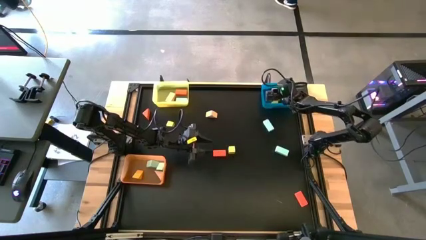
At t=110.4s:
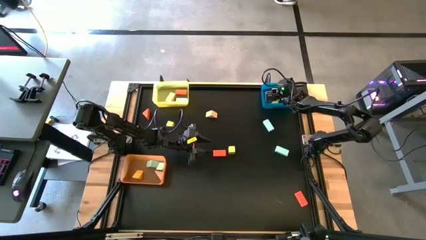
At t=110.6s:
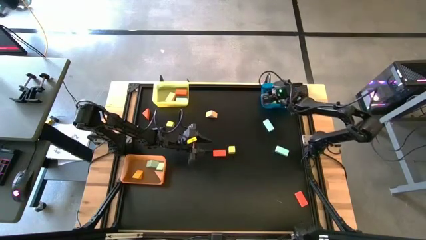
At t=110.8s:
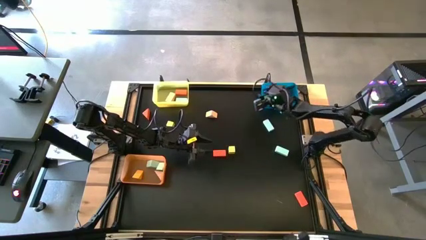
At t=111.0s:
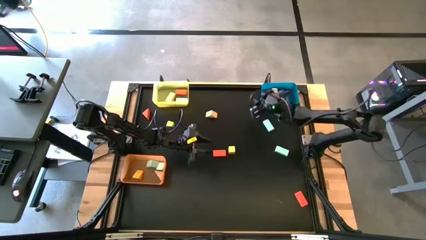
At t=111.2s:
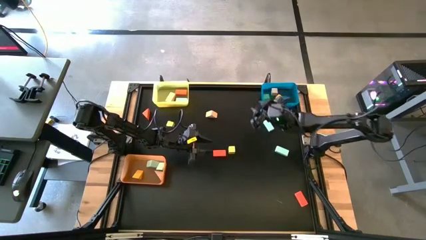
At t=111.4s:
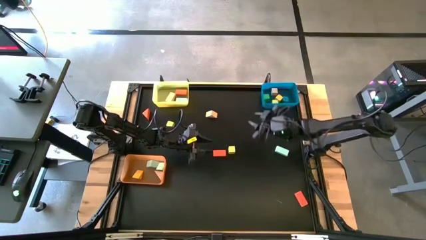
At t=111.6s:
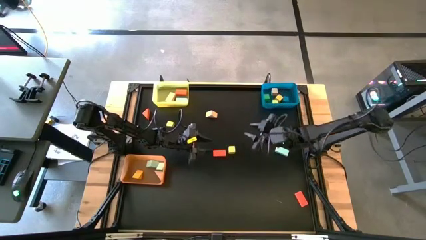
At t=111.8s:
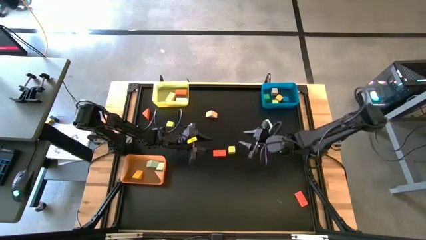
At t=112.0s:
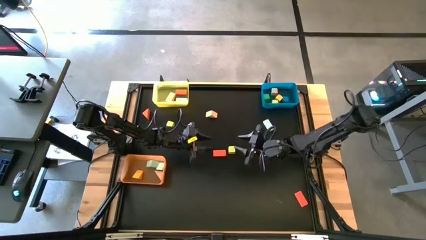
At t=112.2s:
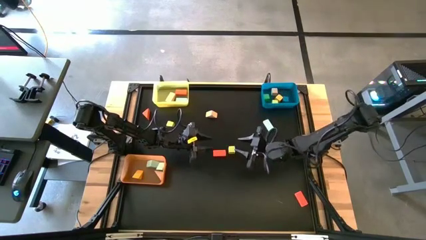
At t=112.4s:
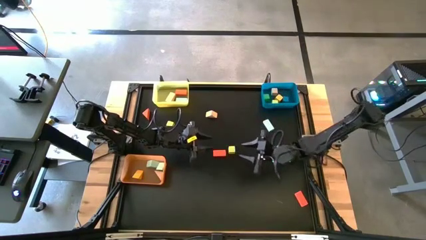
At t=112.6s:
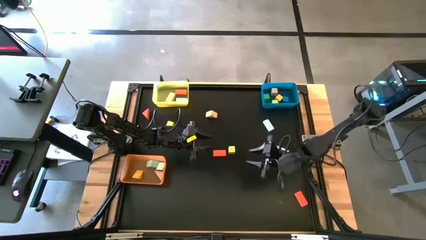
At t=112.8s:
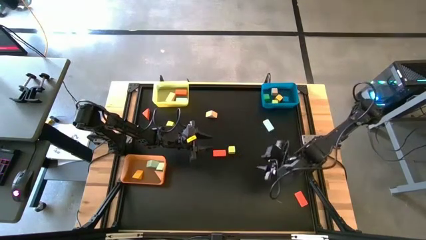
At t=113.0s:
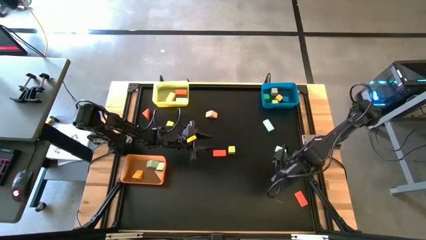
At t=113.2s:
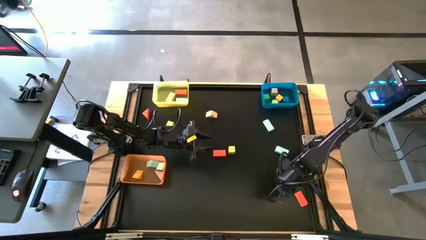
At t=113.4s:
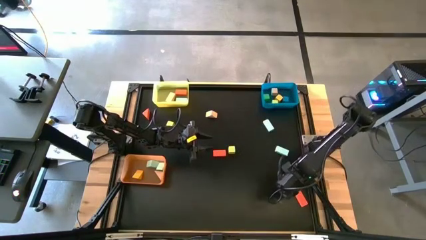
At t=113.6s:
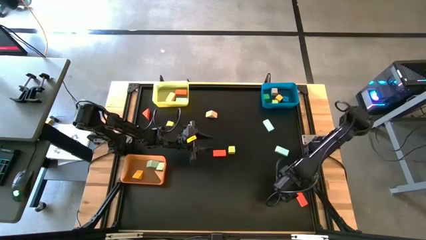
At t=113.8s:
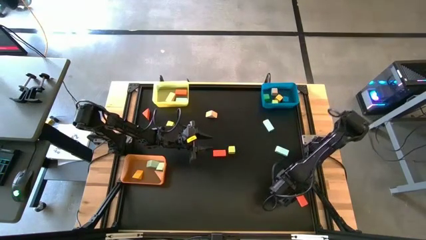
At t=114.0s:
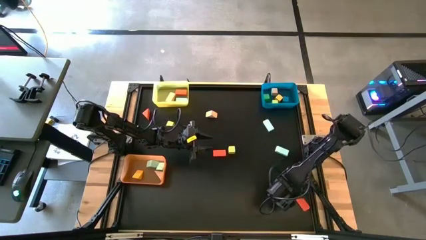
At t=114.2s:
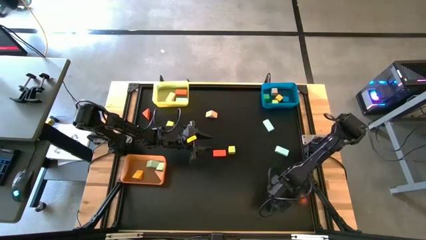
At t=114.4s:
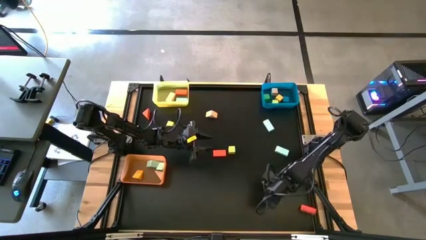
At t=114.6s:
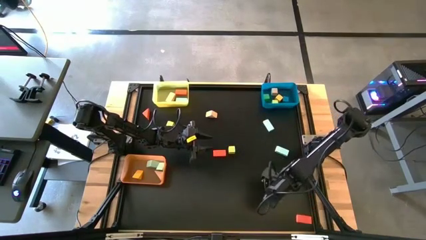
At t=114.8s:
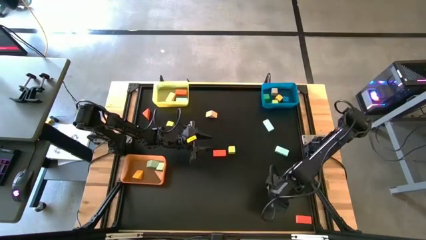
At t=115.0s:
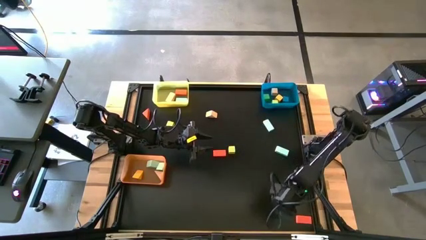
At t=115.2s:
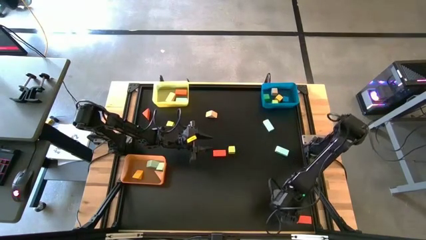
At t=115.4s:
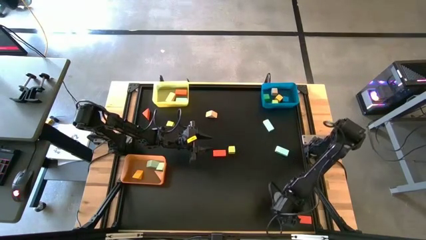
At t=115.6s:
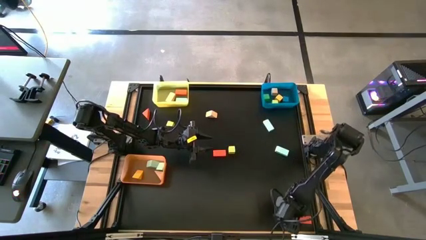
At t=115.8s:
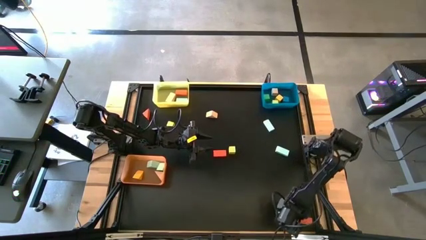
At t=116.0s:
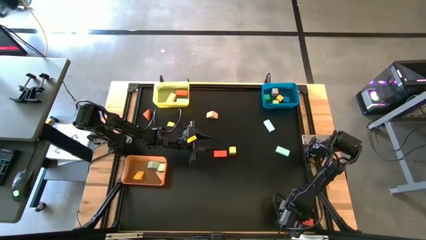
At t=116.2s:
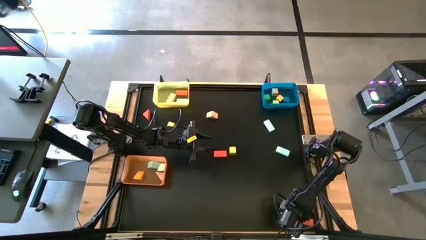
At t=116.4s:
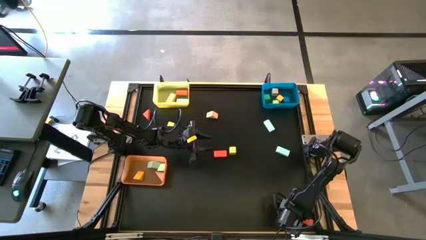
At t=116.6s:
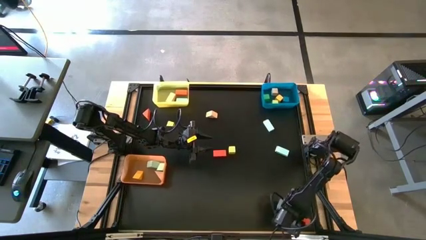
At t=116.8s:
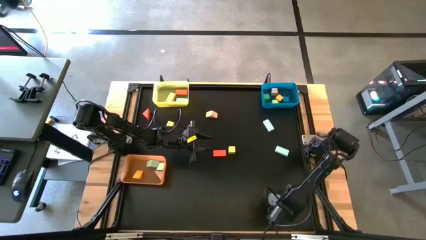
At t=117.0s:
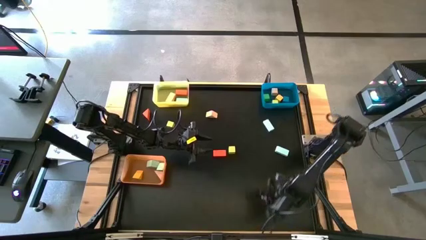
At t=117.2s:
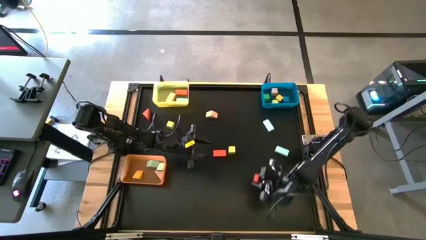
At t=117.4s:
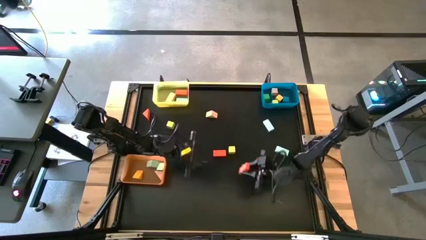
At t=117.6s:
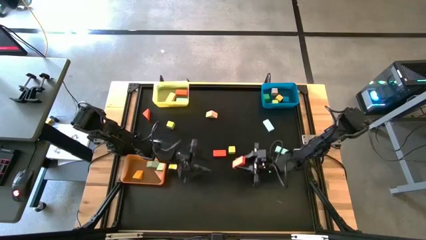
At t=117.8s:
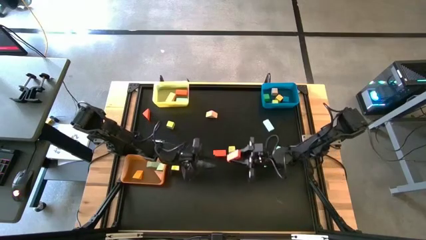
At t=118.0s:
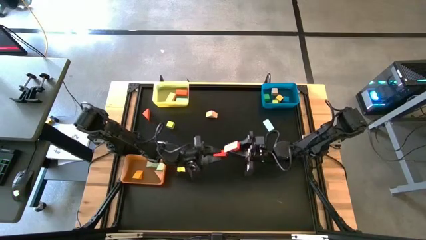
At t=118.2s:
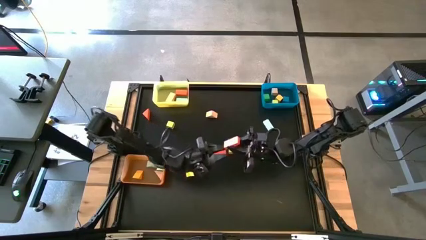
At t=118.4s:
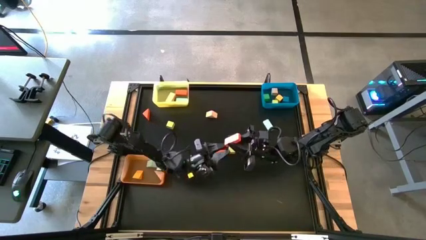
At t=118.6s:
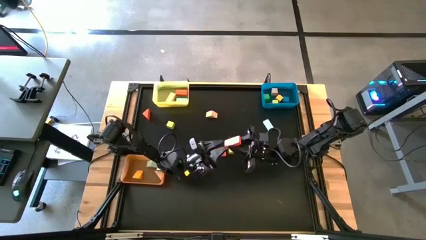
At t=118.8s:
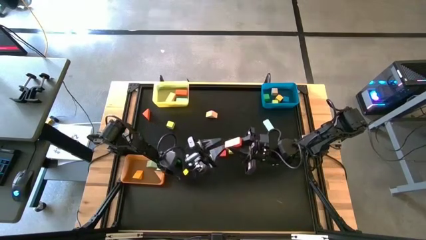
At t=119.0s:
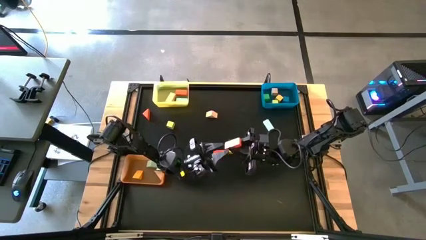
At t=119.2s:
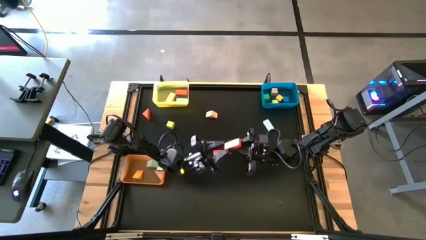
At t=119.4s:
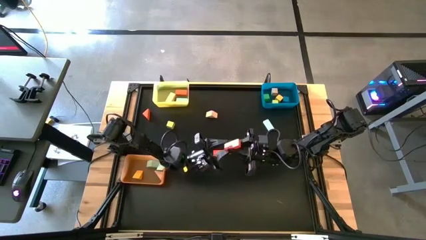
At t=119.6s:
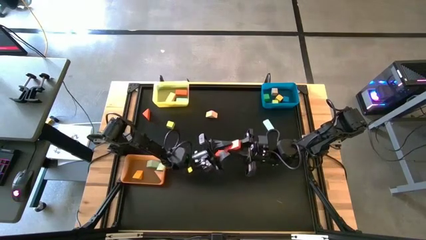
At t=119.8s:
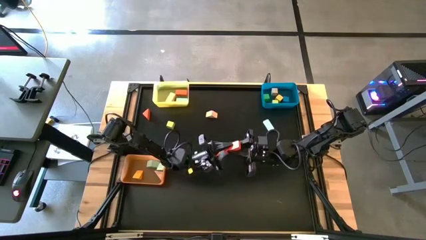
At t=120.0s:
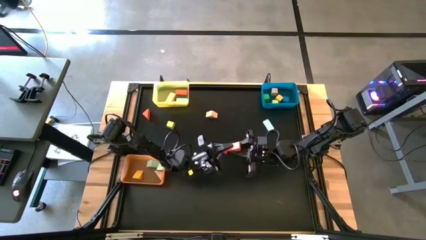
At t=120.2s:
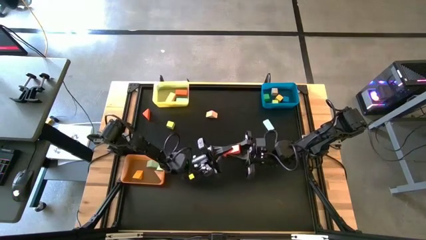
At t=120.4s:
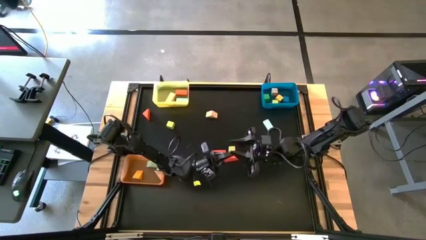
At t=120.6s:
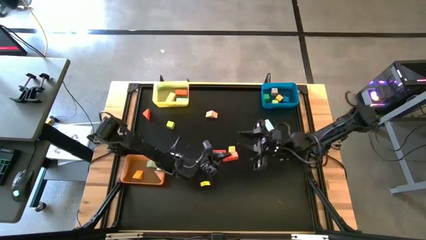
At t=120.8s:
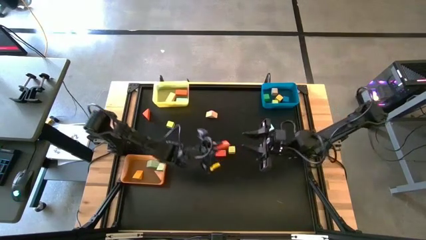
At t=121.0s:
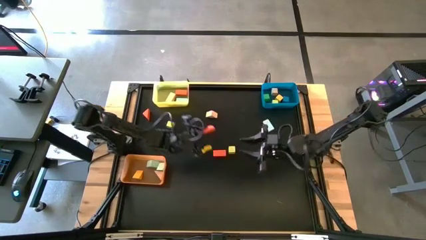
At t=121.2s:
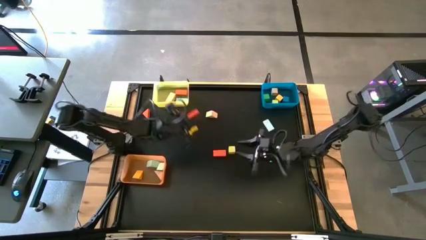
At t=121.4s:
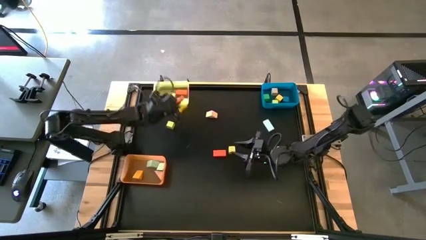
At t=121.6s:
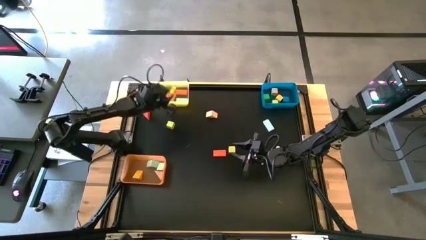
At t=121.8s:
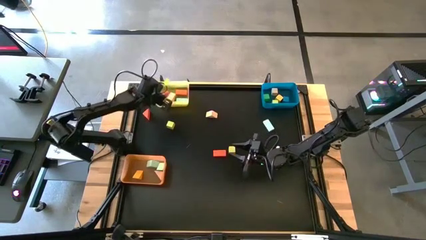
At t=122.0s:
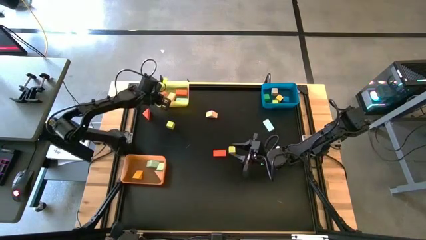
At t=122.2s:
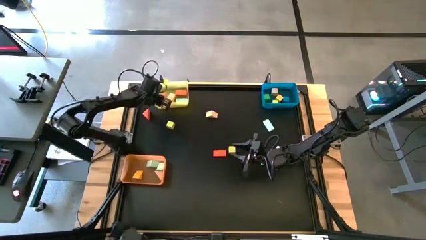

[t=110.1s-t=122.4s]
Task: Sort blocks by size
Put the orange wooden block into the yellow bin

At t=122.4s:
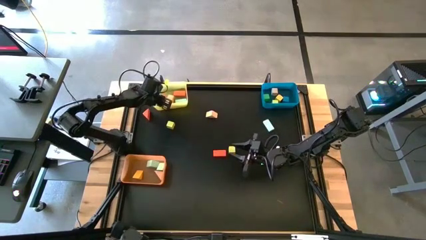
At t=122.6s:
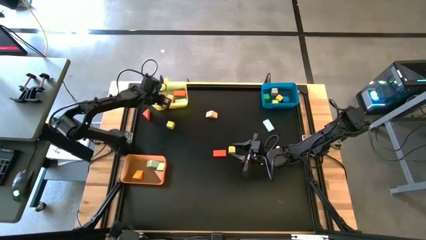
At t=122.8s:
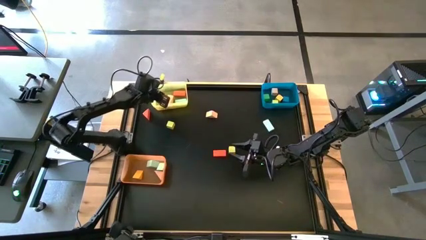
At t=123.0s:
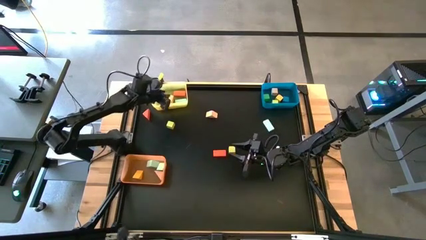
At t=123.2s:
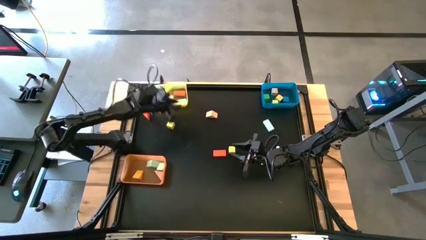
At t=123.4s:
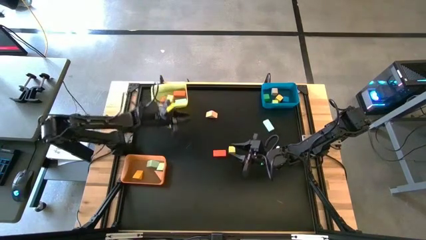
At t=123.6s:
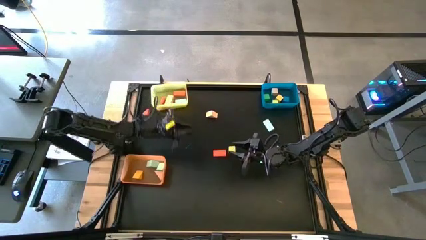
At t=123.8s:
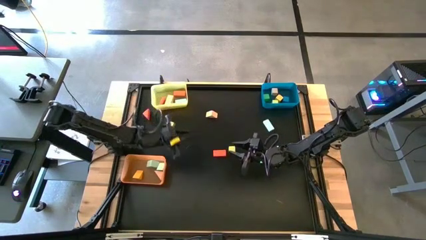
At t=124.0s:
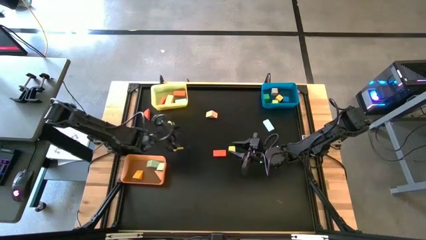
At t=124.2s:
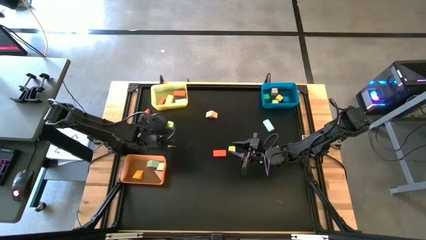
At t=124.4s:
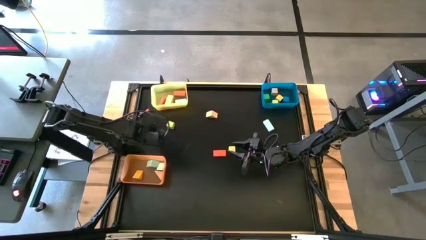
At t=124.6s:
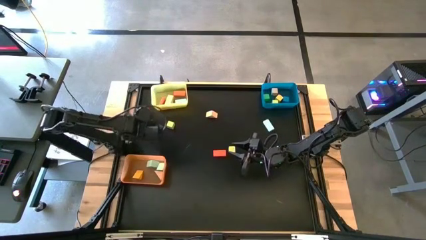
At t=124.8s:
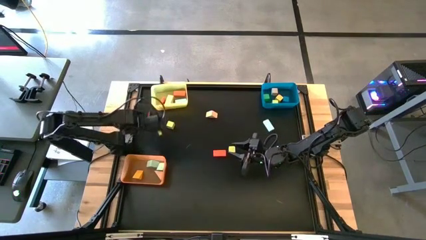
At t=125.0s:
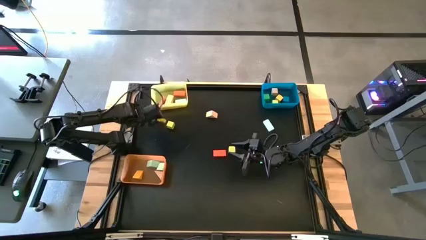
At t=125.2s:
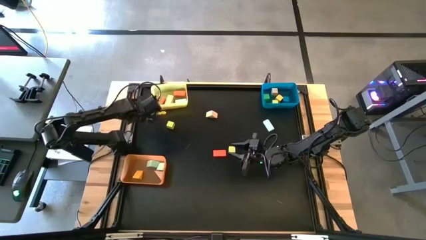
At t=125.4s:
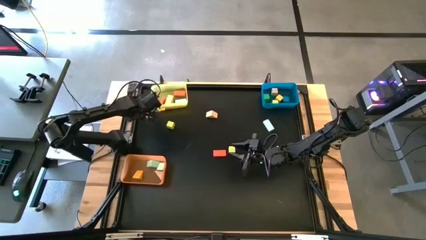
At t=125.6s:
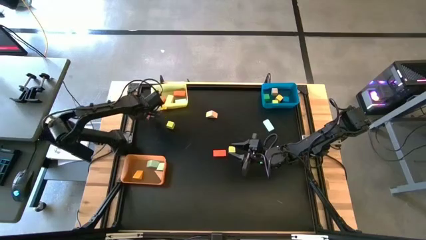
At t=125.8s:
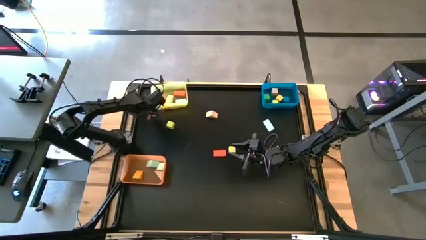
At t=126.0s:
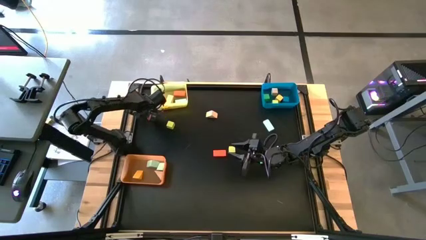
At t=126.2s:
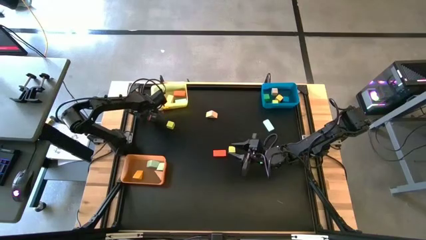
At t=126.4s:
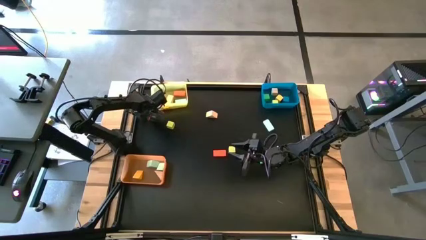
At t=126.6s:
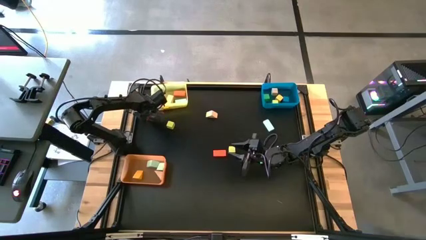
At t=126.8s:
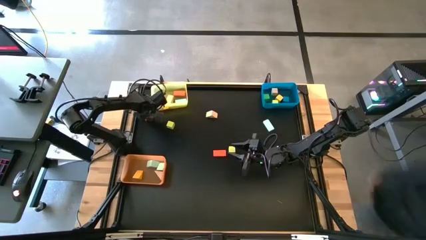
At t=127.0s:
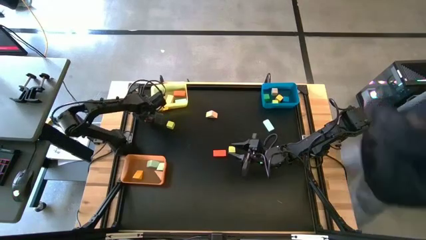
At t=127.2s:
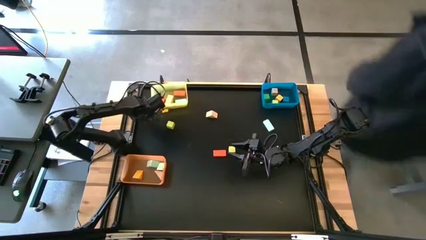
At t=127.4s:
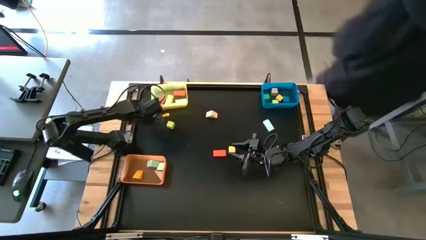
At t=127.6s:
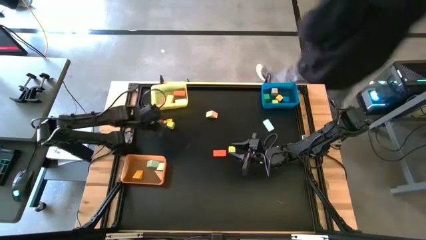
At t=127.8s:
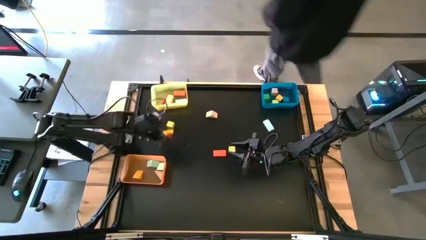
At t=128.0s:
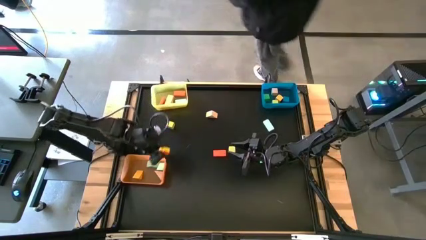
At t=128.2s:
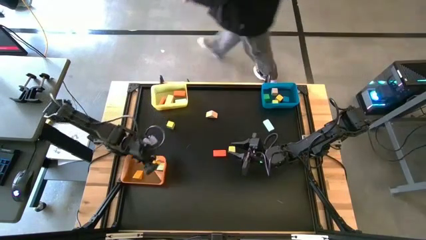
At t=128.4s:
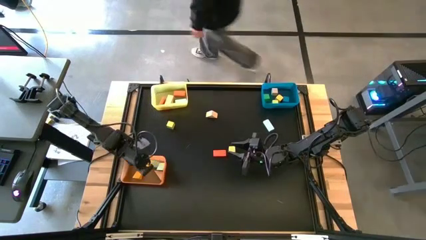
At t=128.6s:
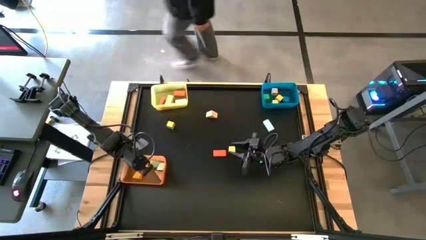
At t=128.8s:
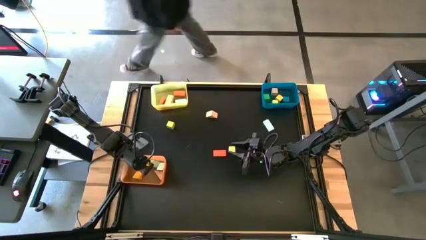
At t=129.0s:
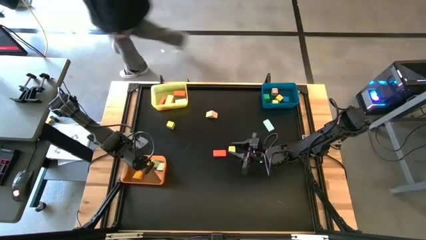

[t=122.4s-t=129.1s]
Put the orange wooden block into the orange bin
